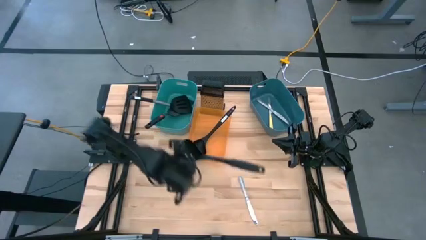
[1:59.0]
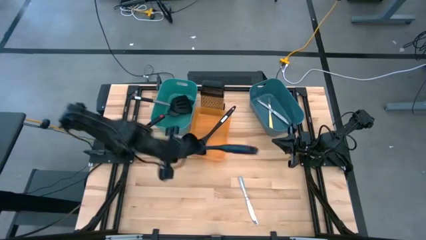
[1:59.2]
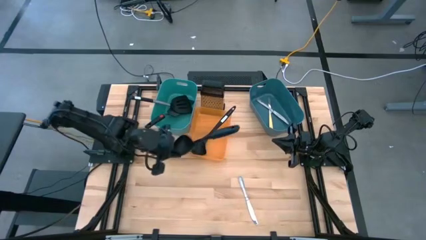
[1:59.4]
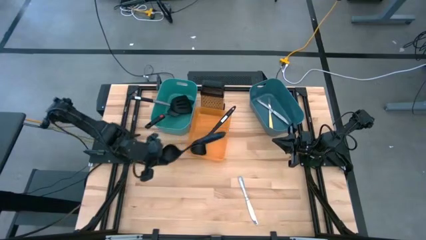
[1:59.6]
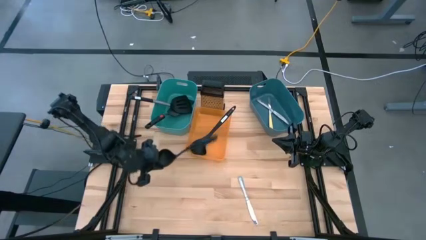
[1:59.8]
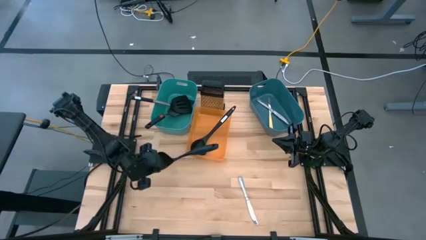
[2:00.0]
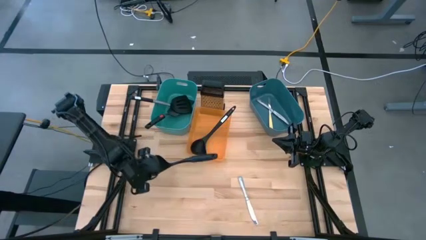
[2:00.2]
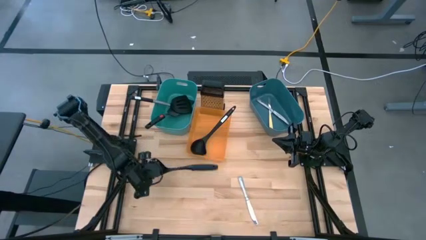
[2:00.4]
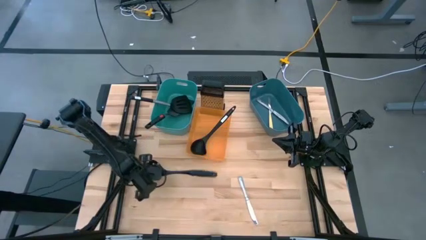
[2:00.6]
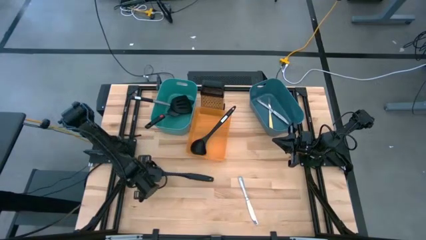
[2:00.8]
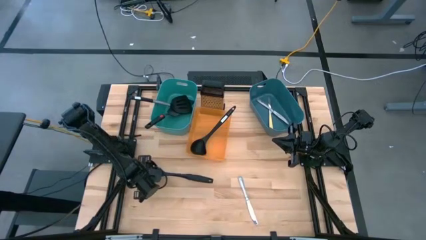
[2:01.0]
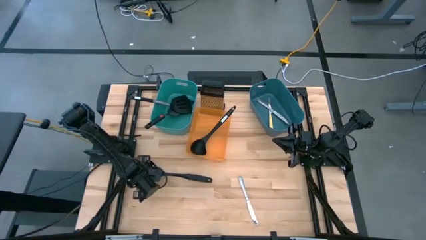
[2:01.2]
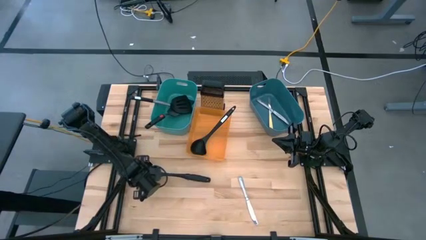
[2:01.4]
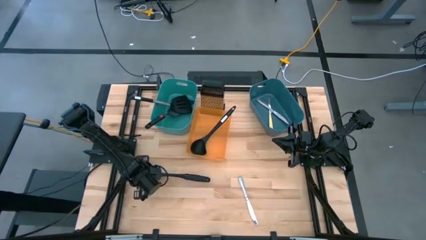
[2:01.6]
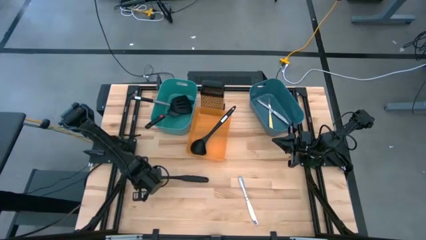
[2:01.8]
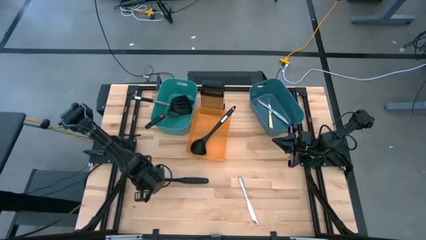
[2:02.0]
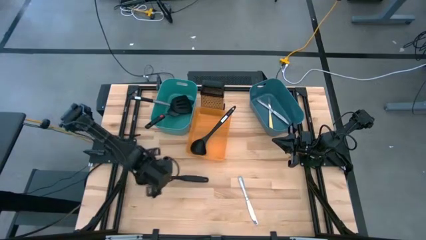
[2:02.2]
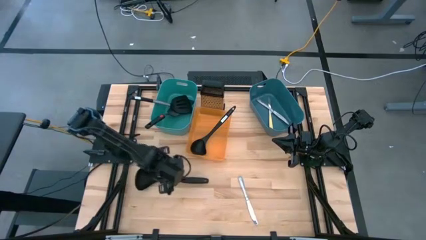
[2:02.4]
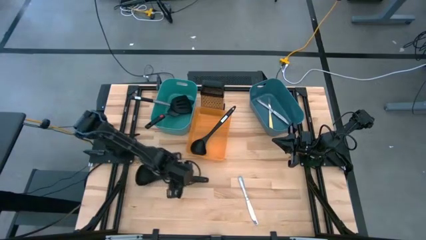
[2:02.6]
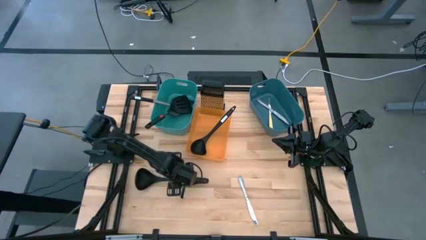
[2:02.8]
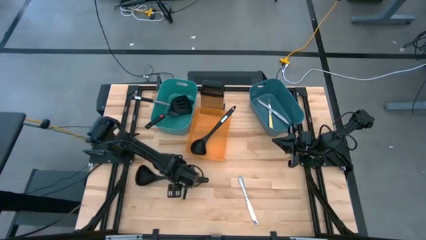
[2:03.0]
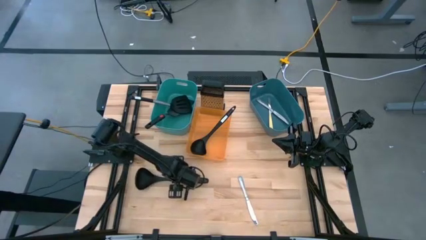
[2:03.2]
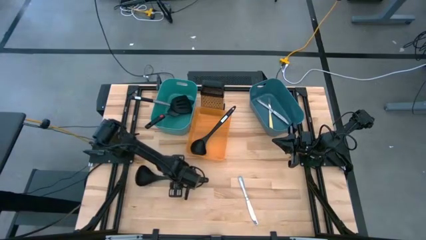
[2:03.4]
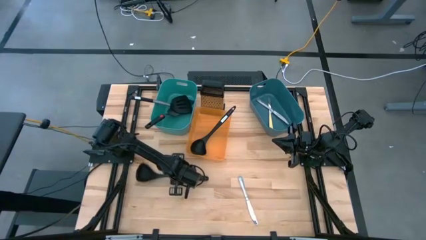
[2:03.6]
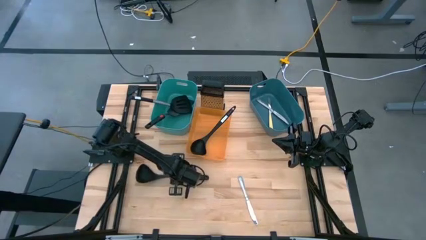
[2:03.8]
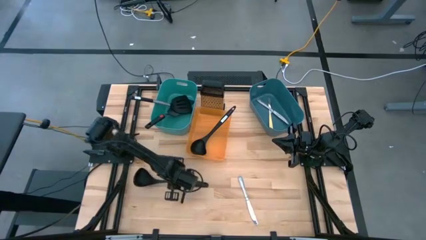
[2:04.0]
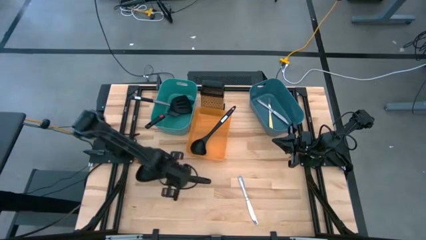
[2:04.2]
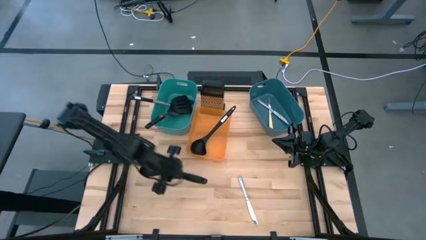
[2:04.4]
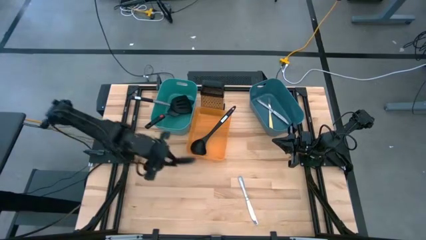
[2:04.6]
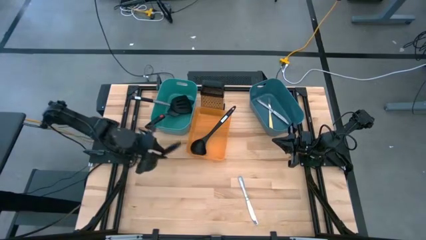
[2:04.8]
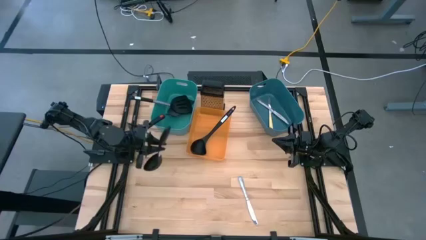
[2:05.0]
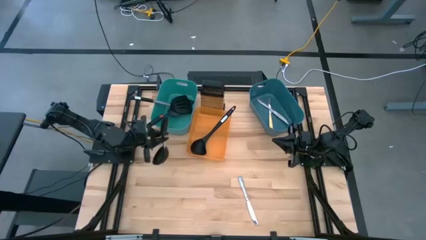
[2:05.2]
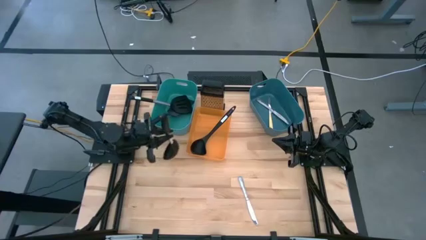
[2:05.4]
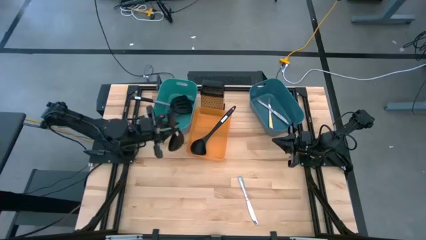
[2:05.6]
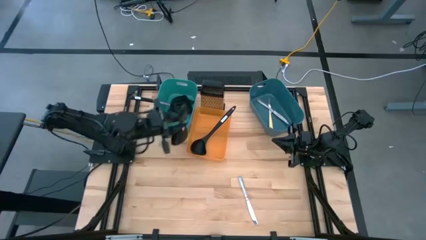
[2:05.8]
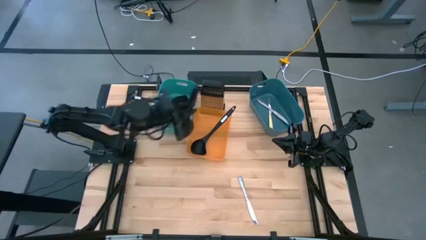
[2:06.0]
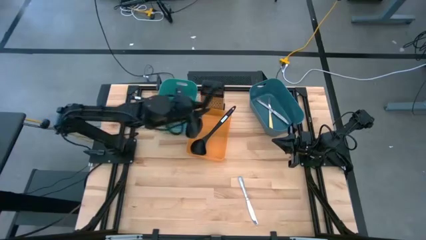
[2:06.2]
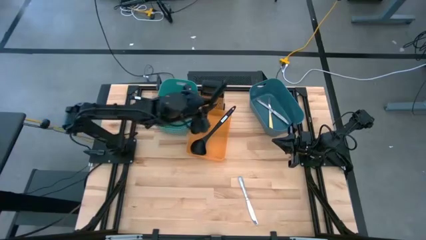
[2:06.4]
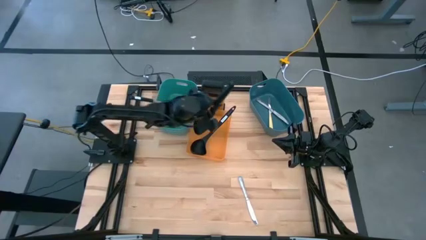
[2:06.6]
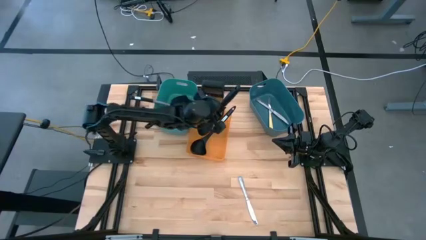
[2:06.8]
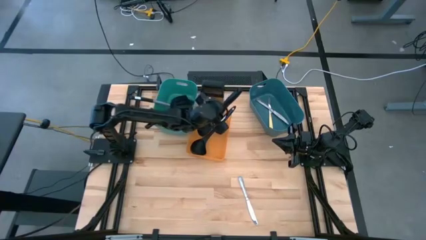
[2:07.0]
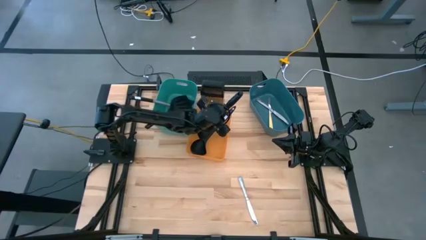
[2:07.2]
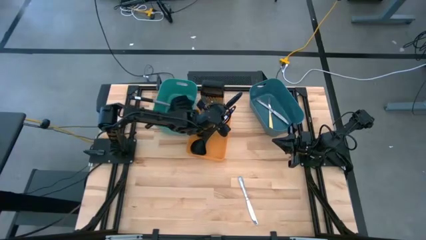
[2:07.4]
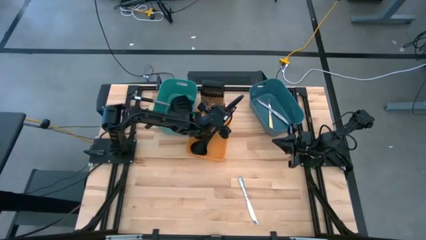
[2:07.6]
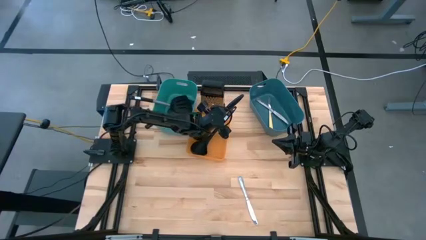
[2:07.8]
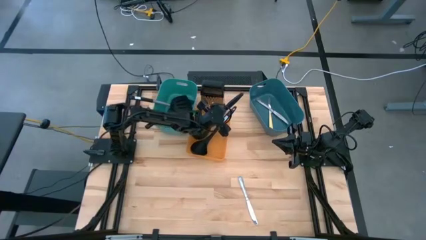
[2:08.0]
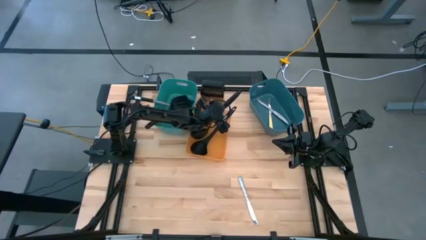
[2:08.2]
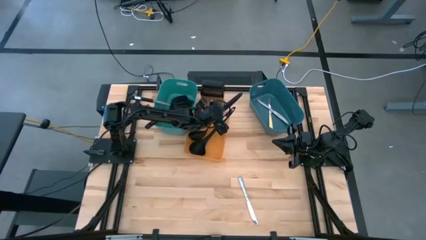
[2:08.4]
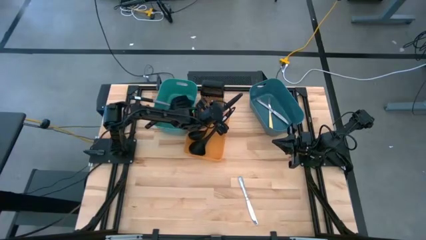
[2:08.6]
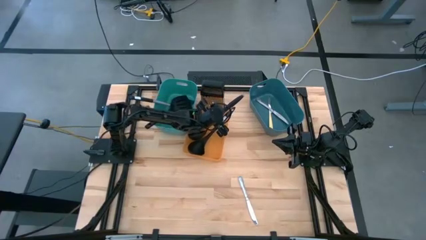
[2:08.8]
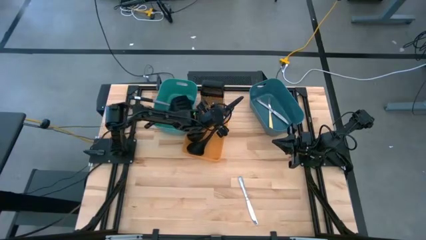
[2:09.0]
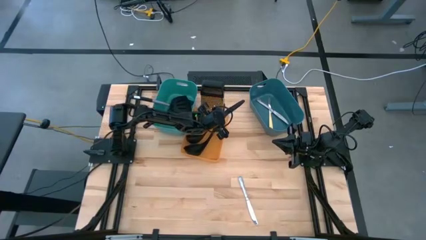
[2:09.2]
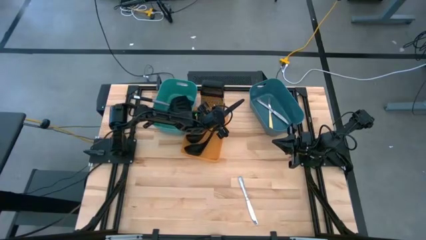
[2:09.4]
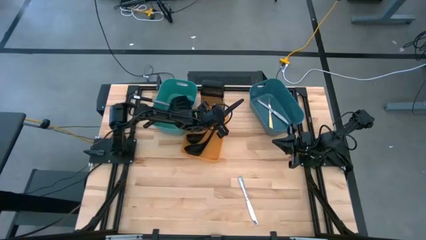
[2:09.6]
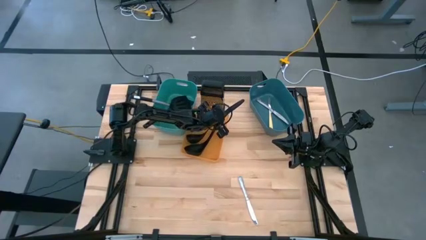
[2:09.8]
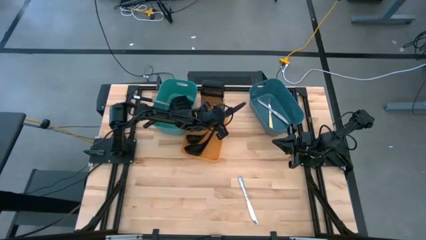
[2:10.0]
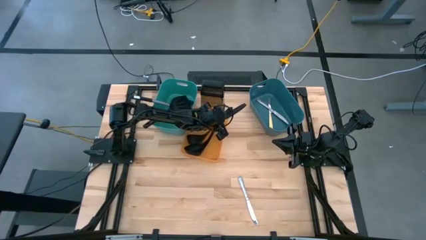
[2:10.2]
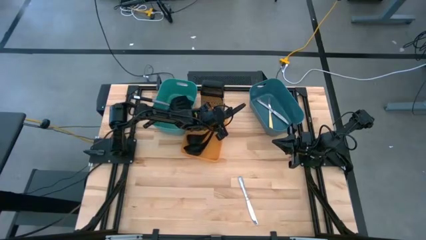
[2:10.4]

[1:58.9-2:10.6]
Task: Pick & Place Kitchen Items
Put the black ladle into the orange bin

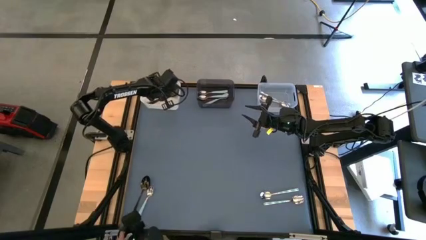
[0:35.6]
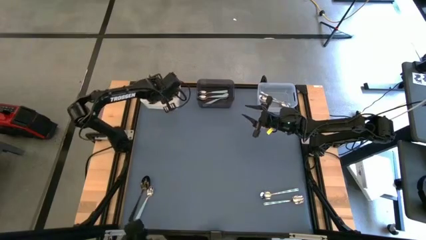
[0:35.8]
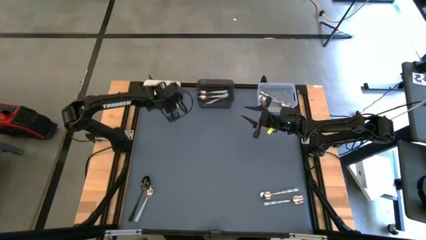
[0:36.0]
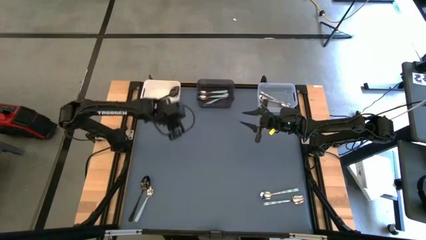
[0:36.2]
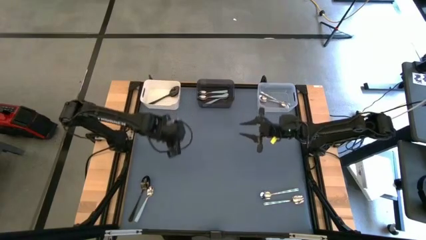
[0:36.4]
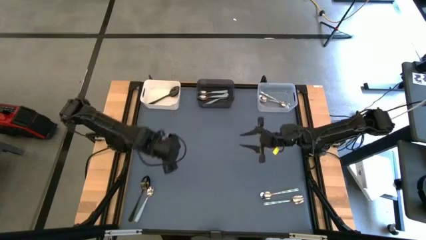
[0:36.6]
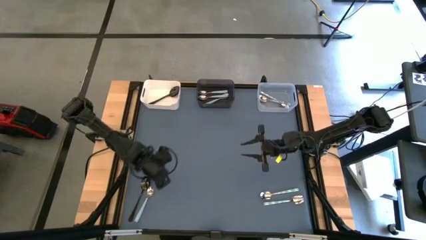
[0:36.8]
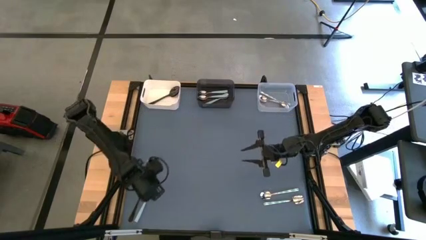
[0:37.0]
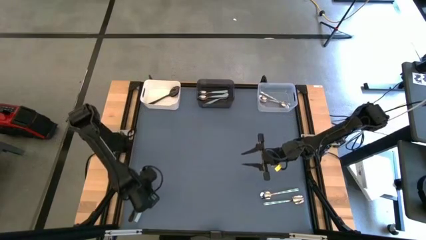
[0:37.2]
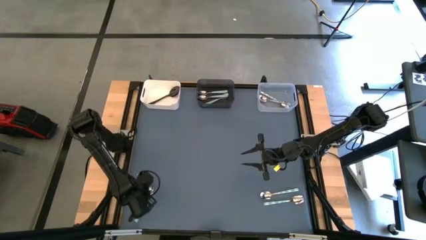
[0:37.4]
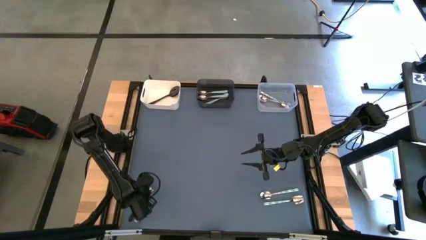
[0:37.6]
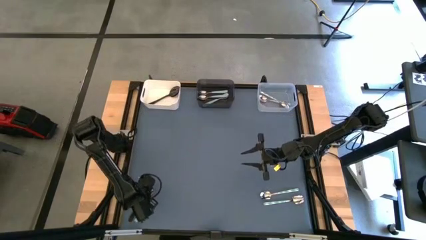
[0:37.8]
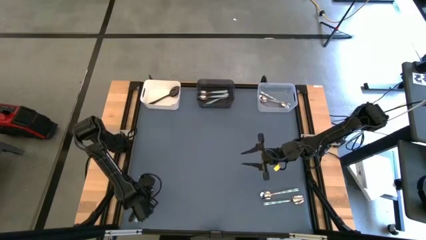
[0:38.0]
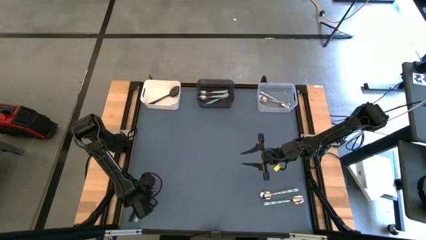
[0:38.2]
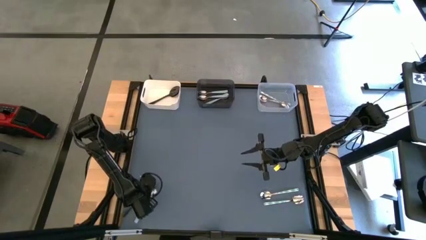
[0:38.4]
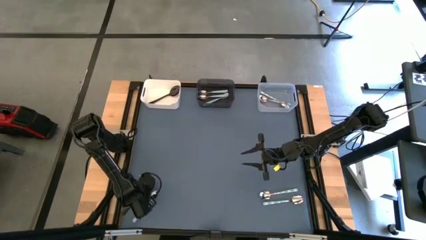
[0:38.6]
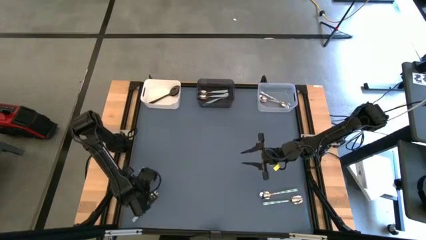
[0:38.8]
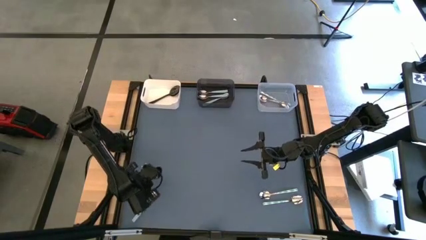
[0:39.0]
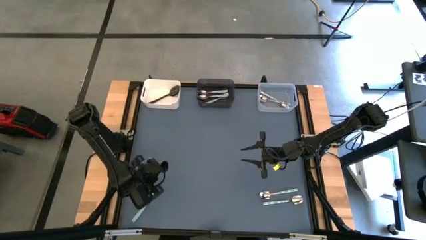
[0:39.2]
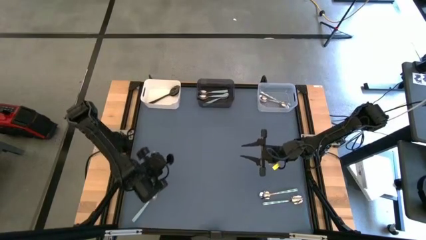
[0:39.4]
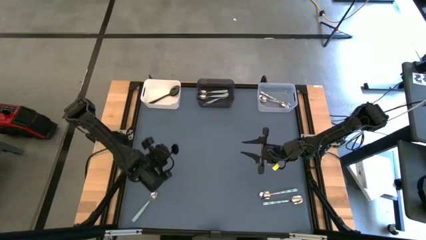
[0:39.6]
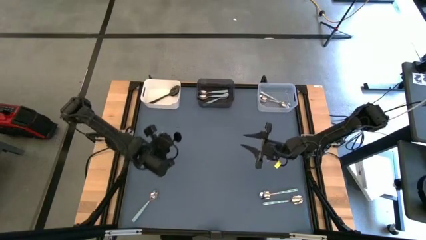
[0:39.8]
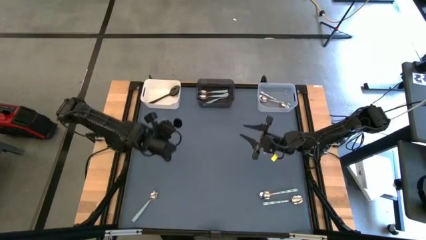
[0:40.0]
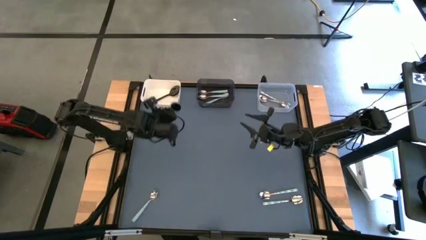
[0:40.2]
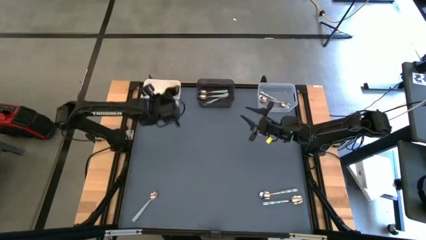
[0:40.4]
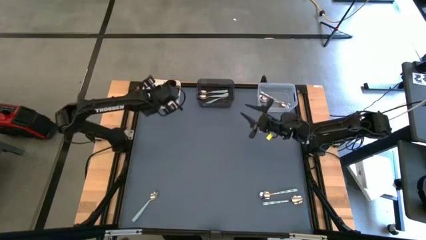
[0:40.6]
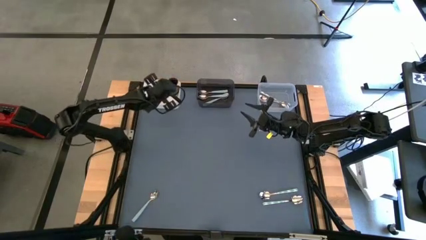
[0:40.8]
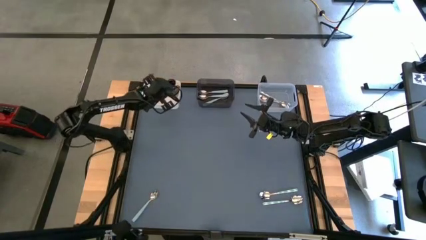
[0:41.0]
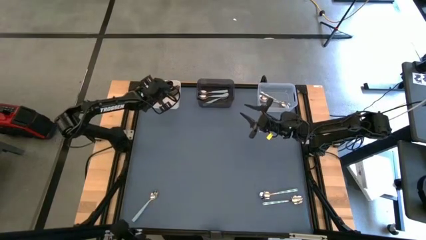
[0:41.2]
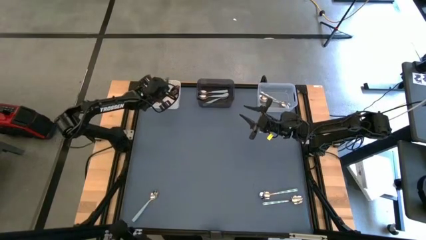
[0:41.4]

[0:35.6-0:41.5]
Task: Sort silverware by color (type)
Put the black spoon into the white bin
